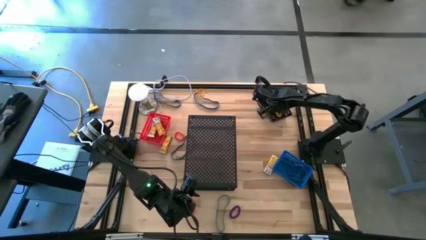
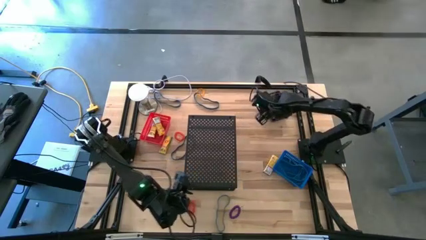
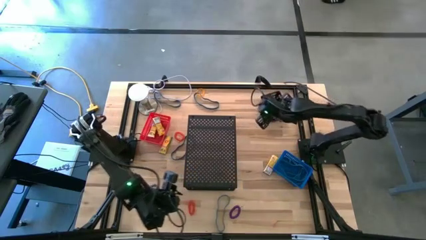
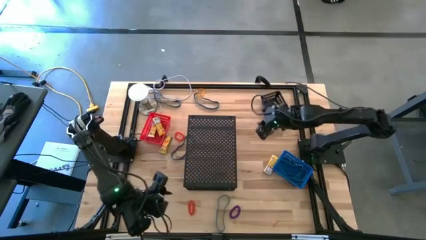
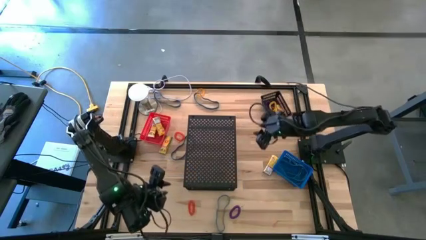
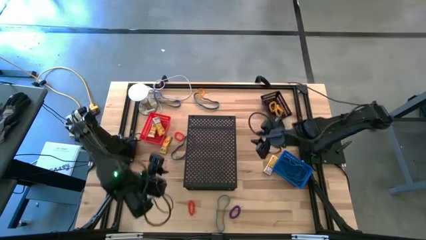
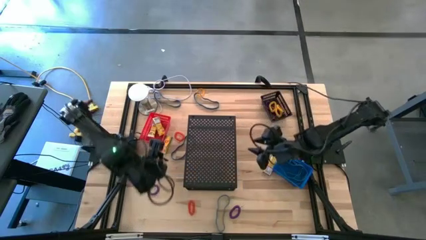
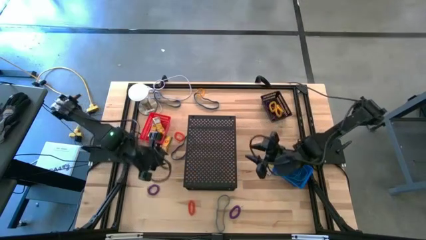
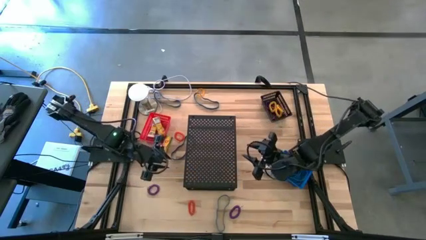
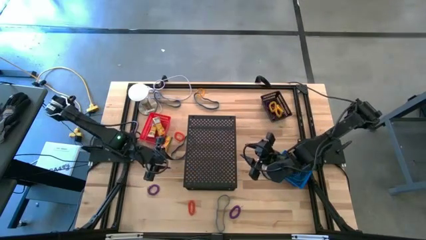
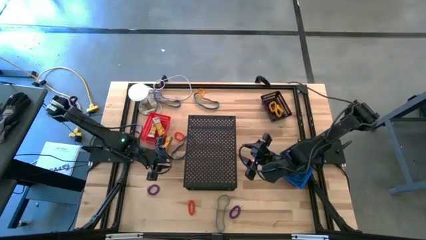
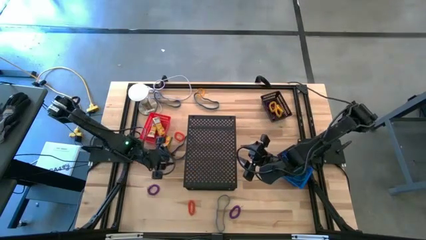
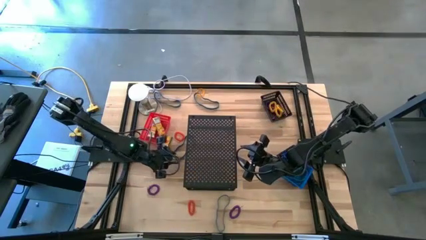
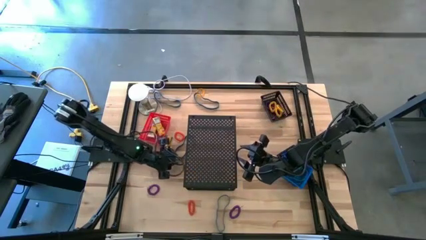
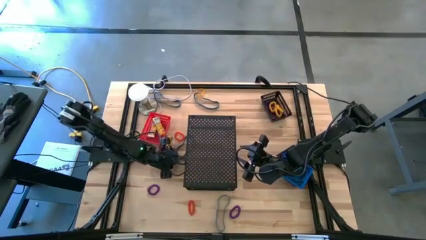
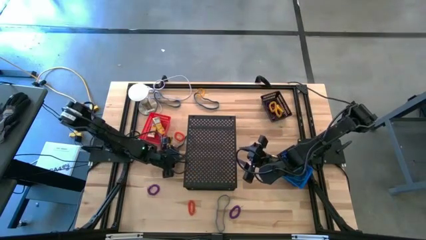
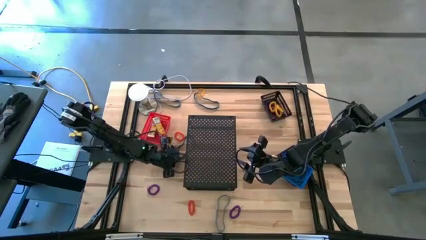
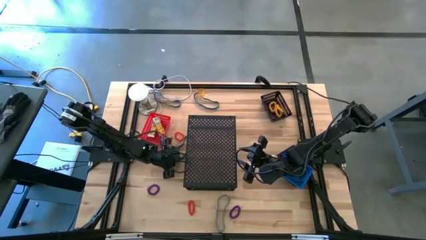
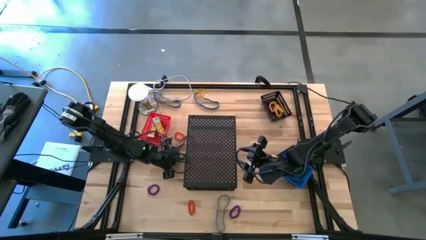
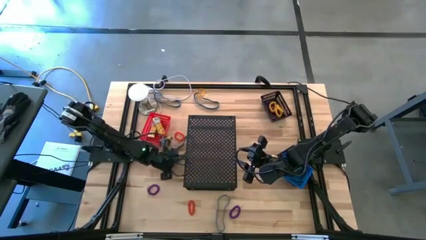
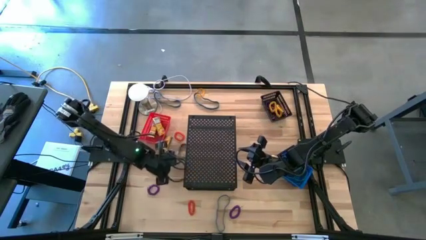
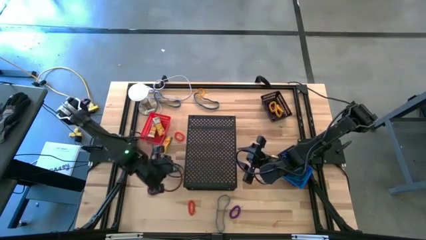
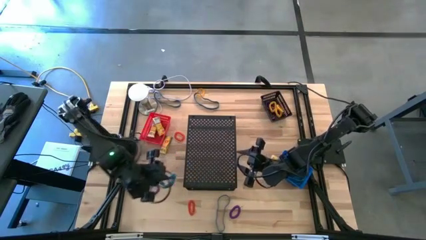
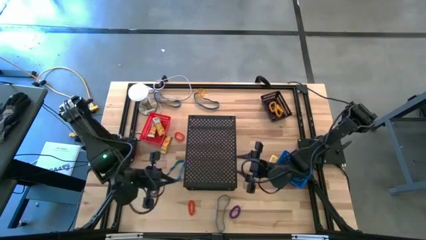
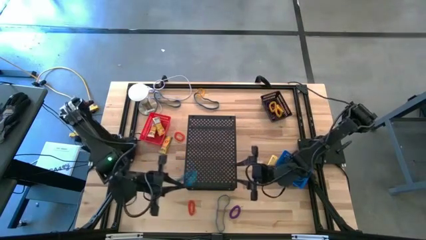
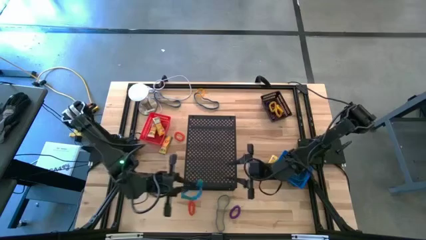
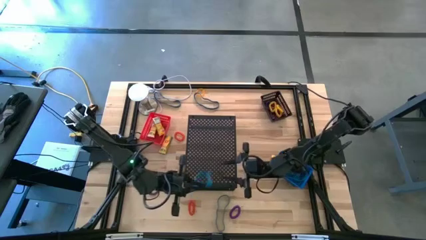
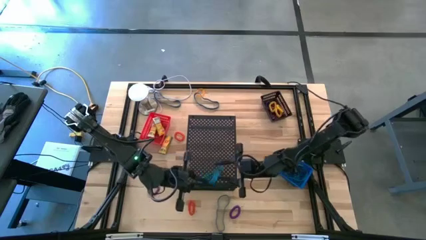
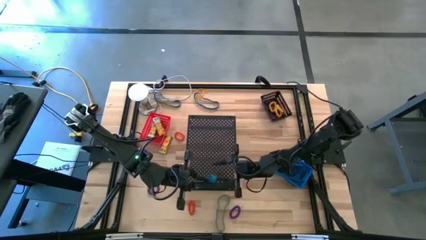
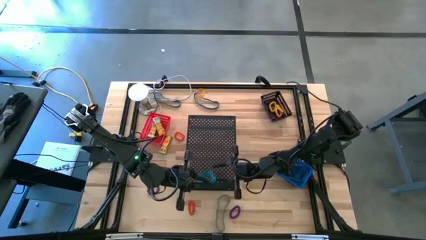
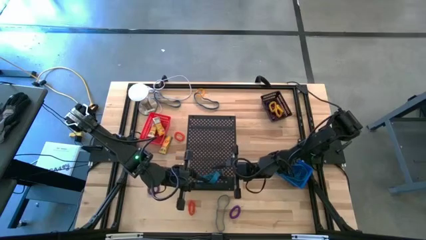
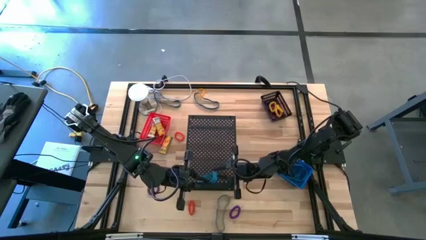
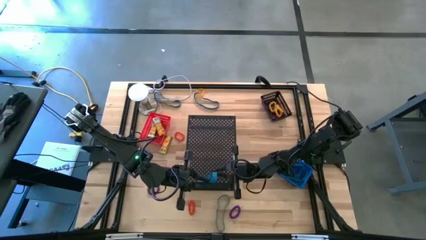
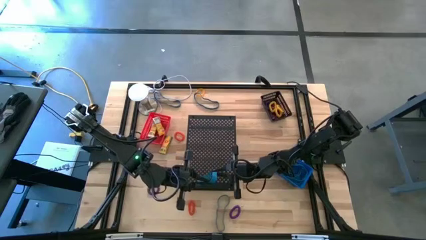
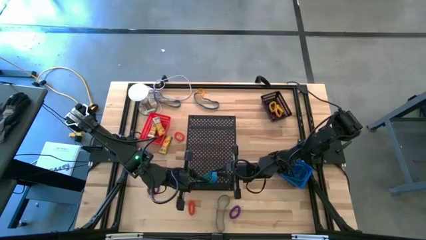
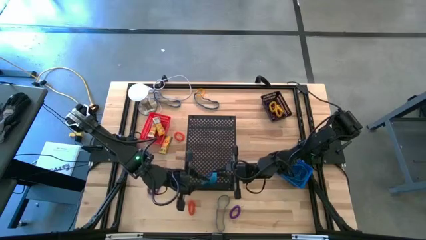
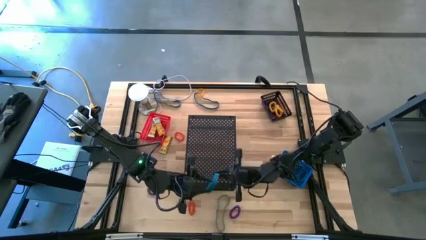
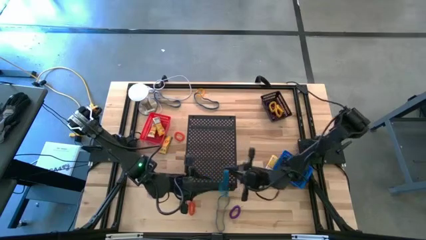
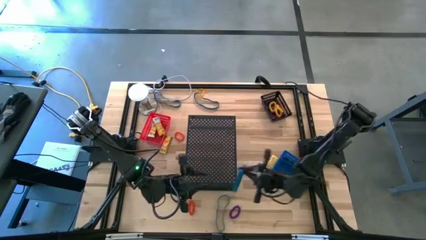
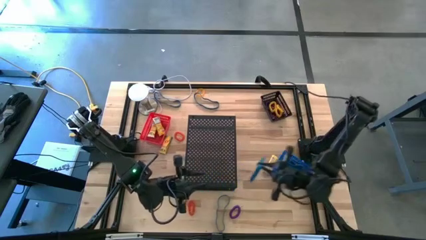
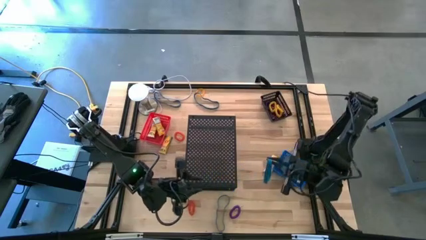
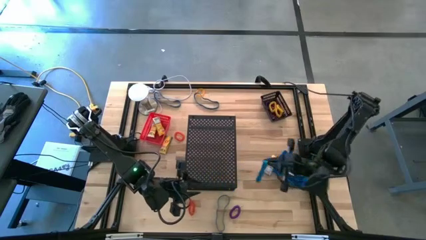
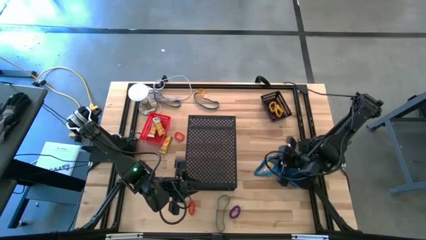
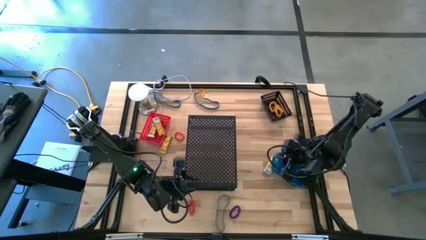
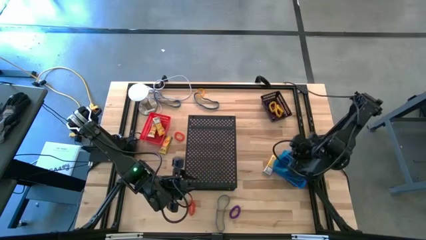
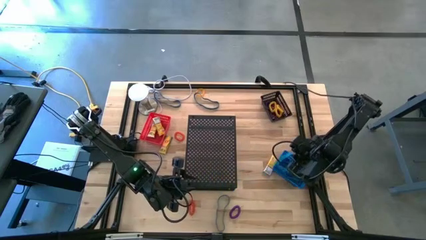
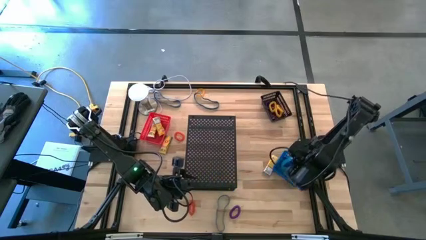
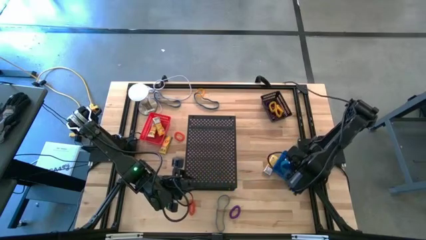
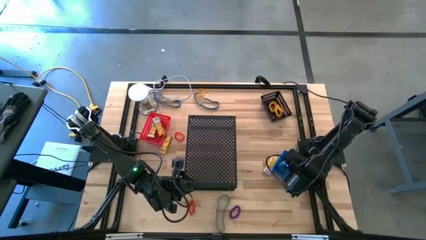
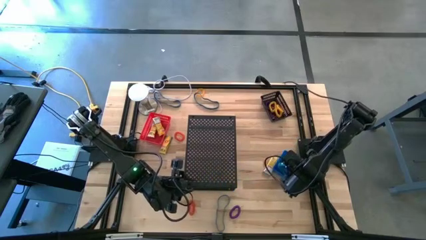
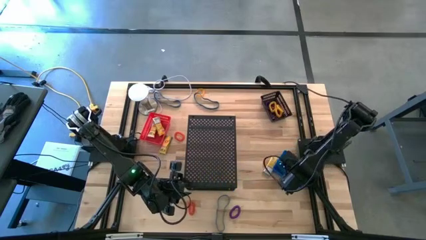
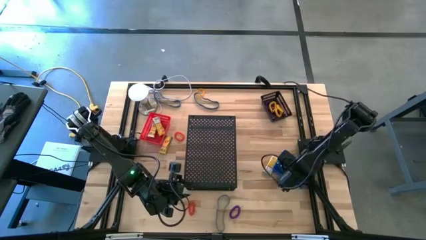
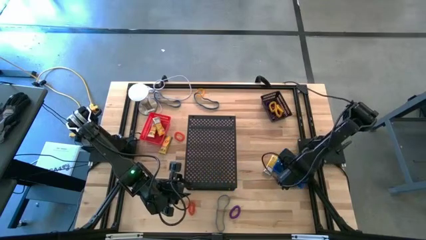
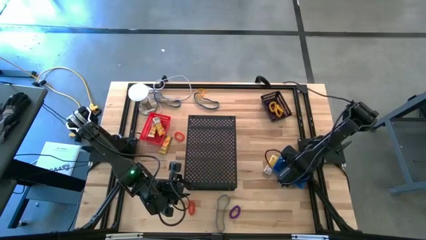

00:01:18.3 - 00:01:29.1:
Task: Pick & Place Office Desk Supplies
Put the blue rubber band into the blue bin

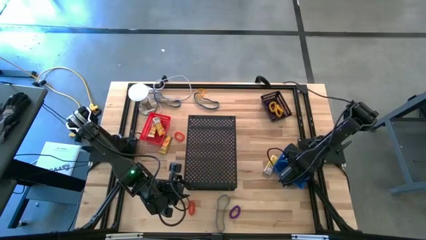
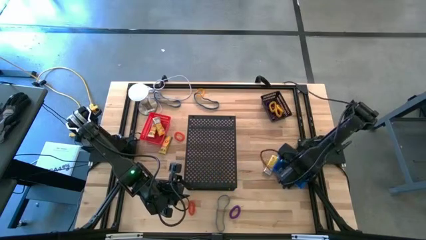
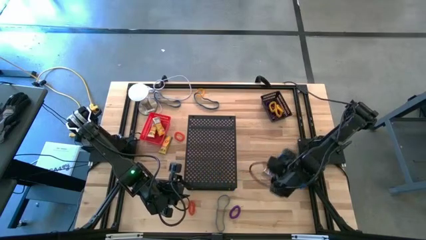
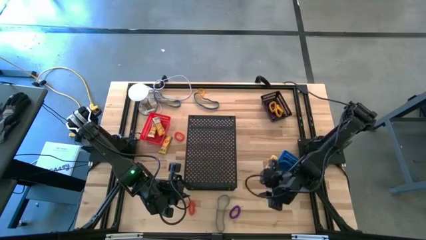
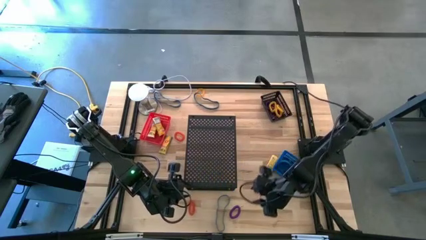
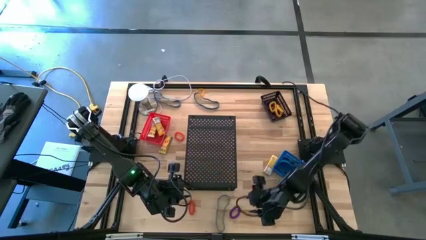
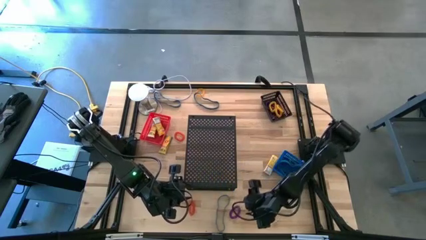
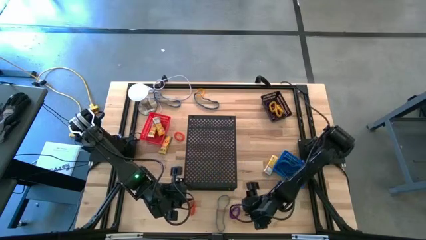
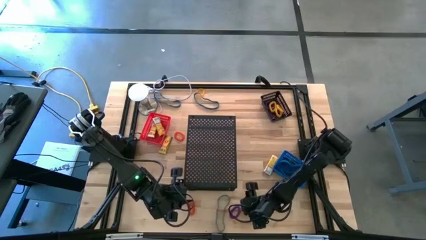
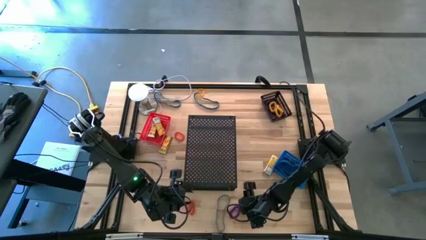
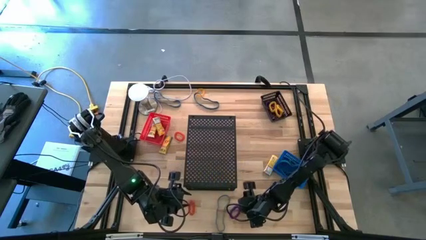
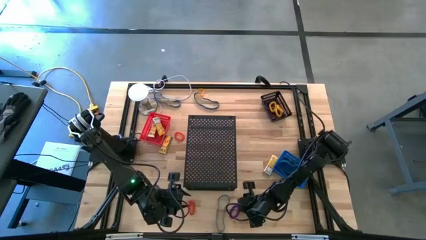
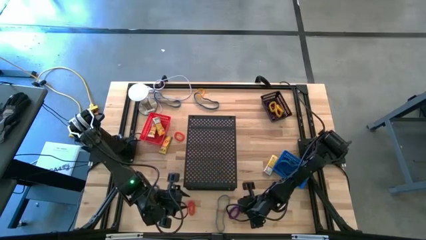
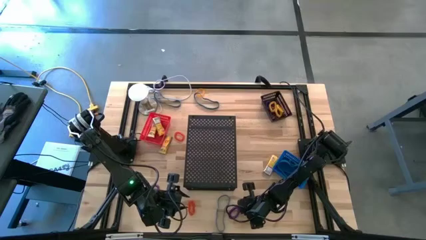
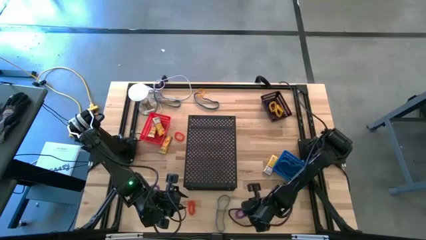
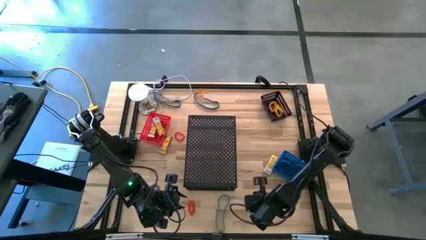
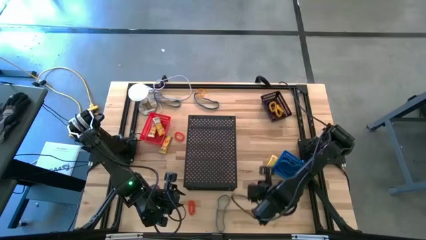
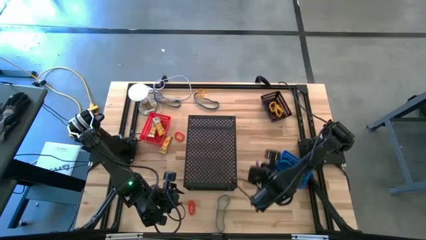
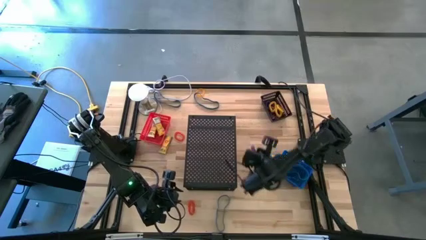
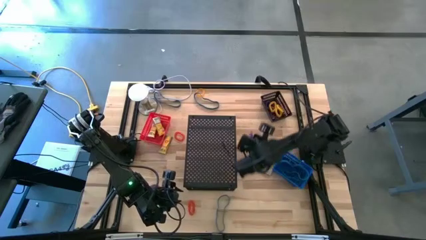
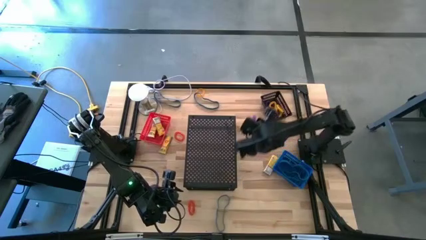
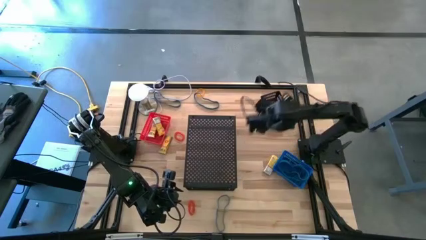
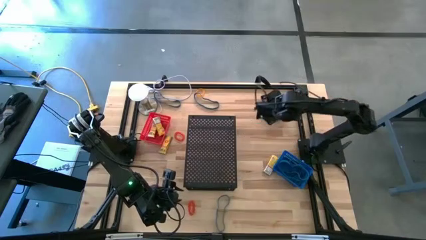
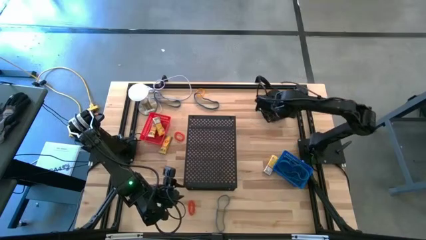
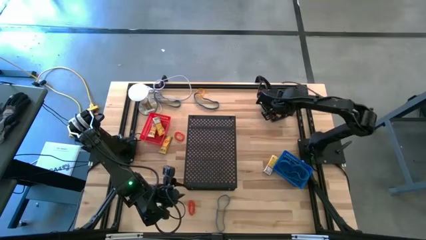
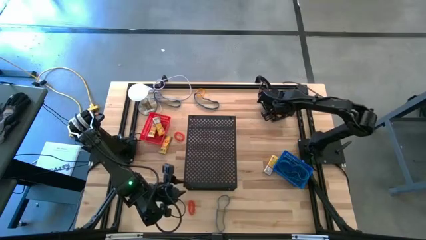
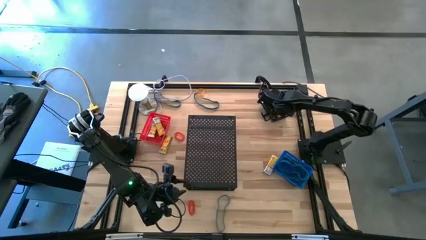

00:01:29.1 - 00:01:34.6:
Put the violet spring keychain into the black bin
